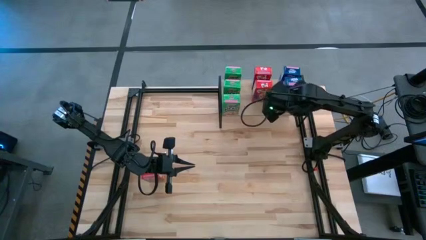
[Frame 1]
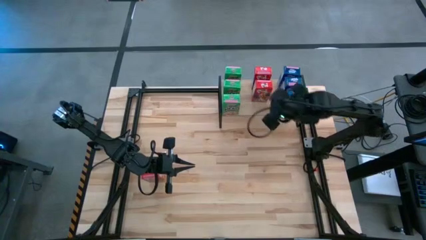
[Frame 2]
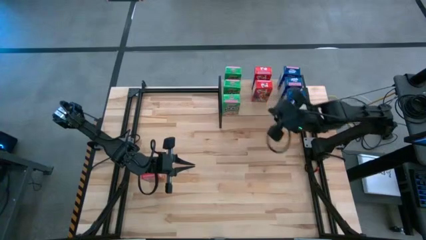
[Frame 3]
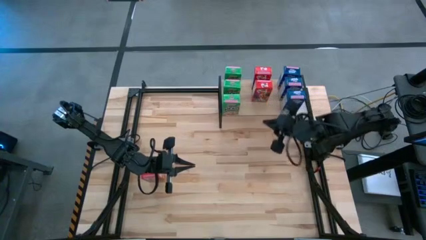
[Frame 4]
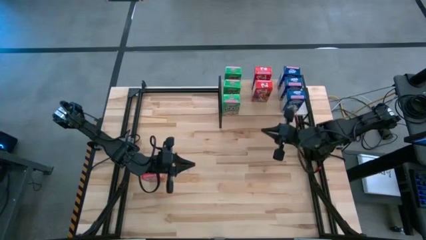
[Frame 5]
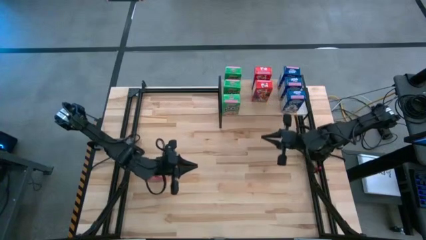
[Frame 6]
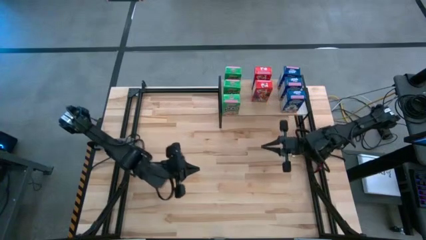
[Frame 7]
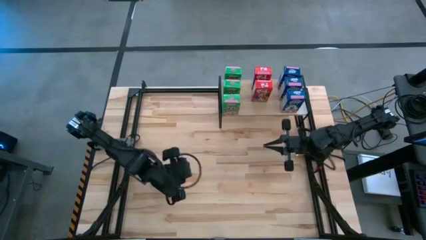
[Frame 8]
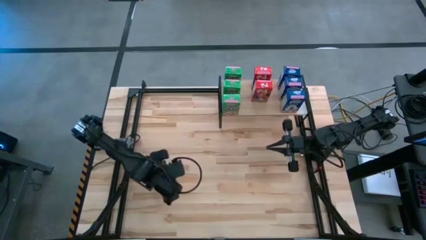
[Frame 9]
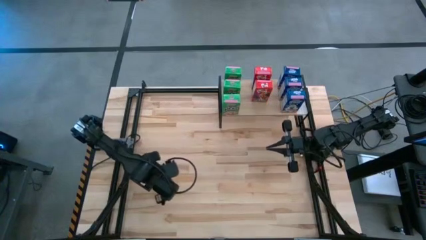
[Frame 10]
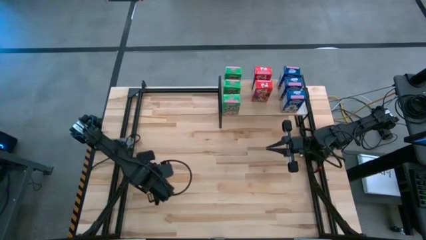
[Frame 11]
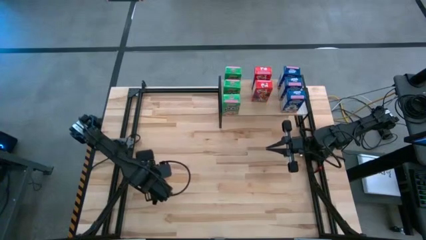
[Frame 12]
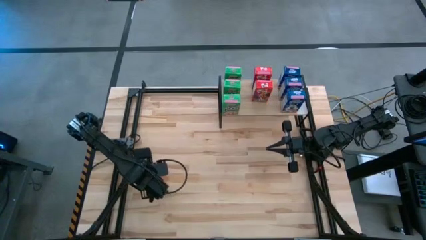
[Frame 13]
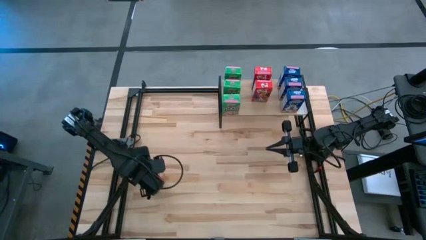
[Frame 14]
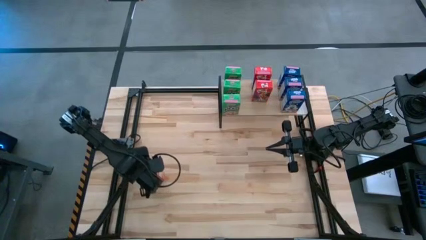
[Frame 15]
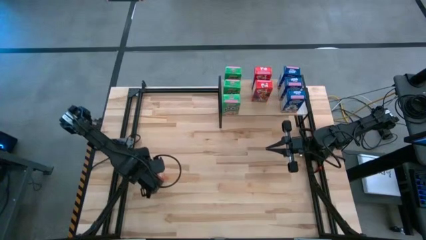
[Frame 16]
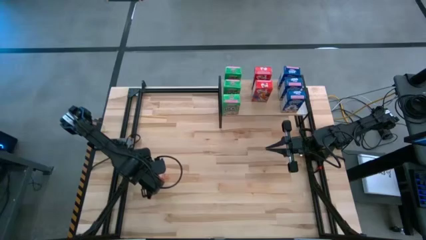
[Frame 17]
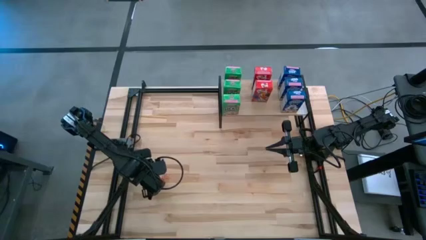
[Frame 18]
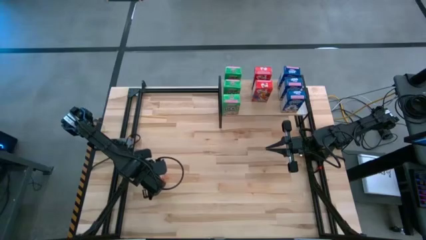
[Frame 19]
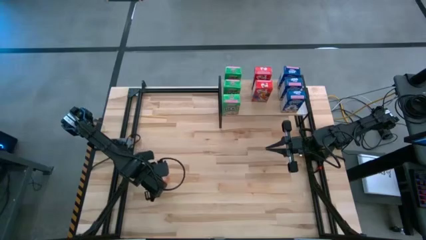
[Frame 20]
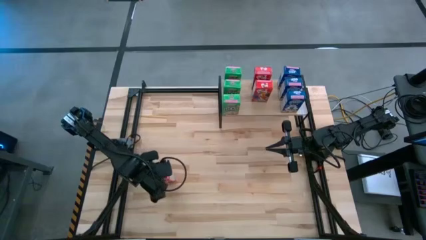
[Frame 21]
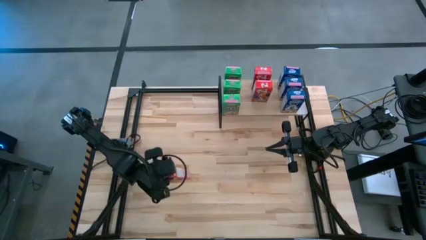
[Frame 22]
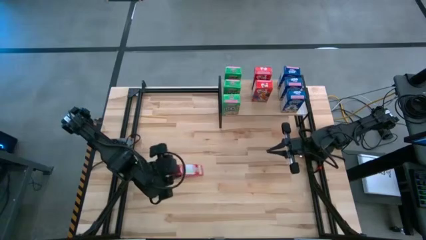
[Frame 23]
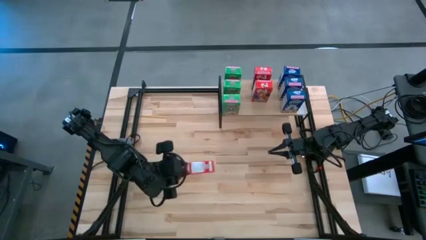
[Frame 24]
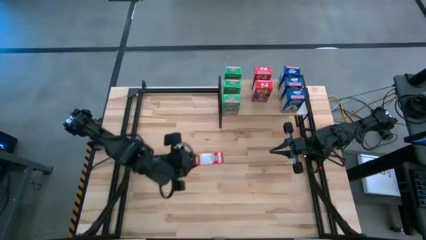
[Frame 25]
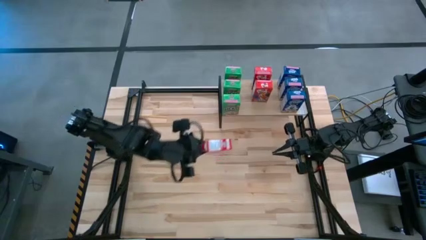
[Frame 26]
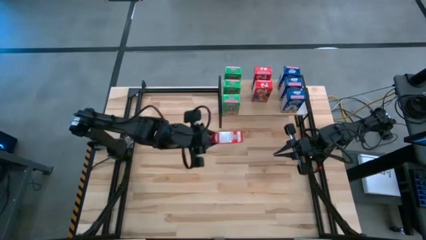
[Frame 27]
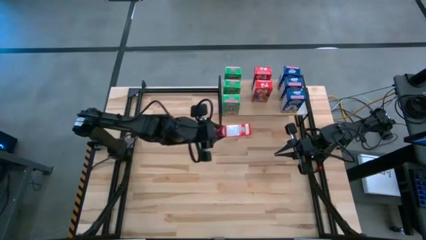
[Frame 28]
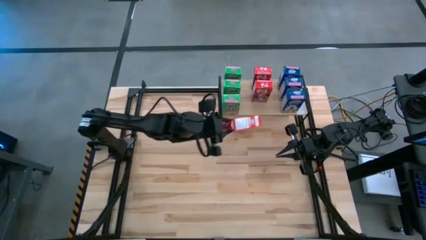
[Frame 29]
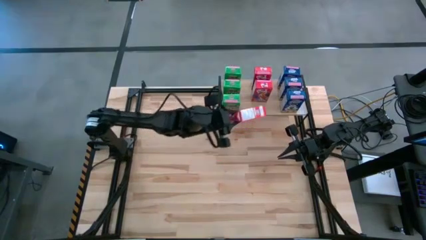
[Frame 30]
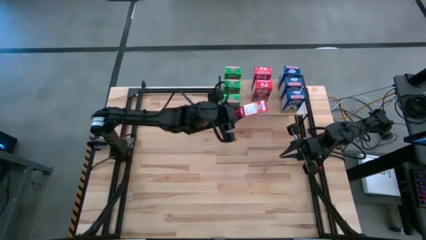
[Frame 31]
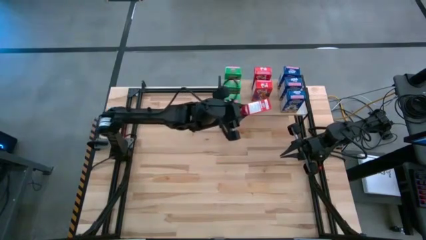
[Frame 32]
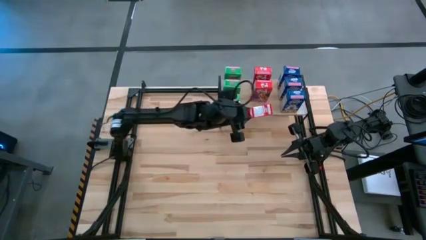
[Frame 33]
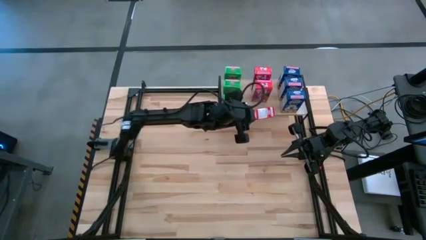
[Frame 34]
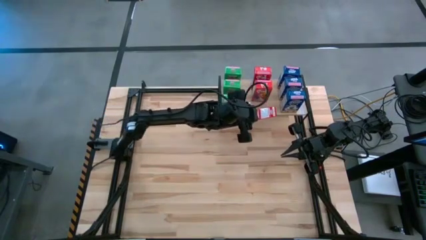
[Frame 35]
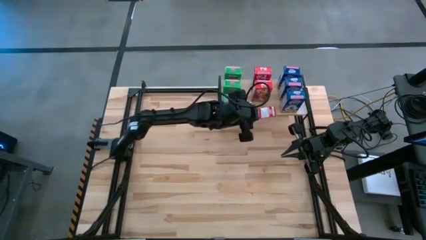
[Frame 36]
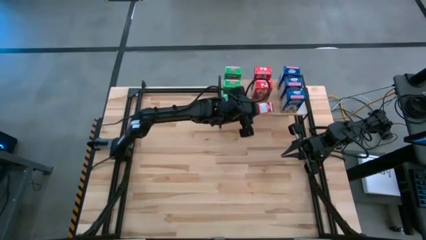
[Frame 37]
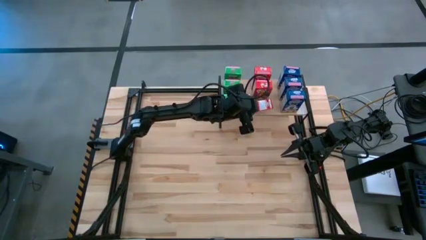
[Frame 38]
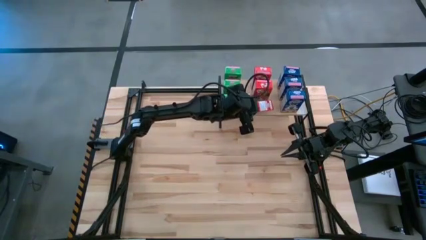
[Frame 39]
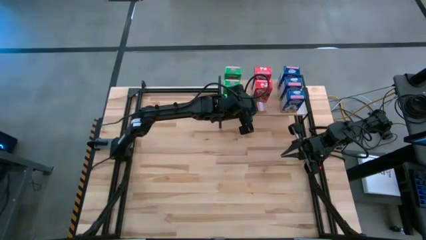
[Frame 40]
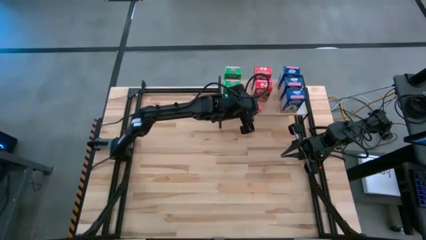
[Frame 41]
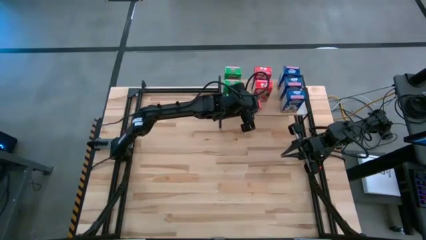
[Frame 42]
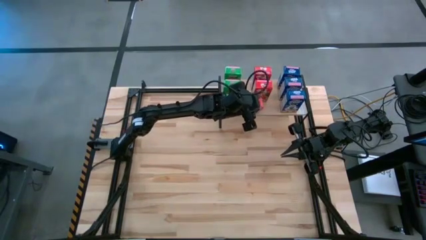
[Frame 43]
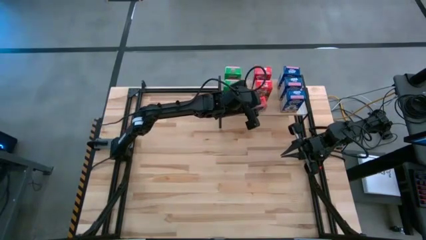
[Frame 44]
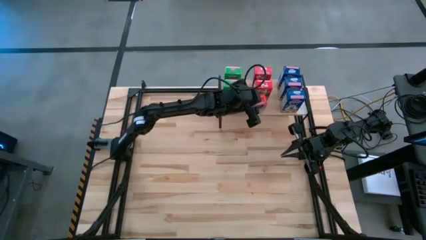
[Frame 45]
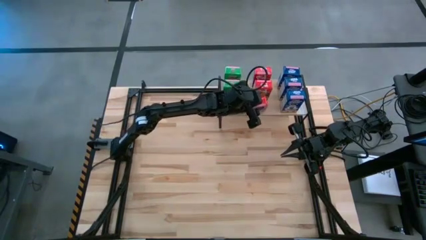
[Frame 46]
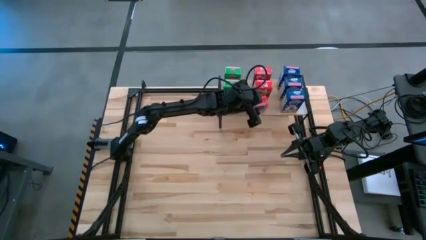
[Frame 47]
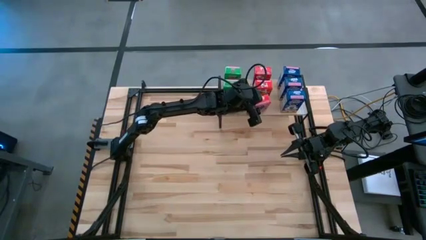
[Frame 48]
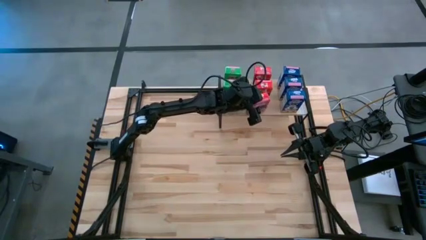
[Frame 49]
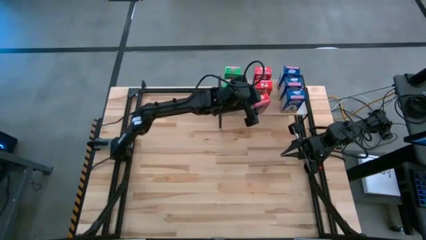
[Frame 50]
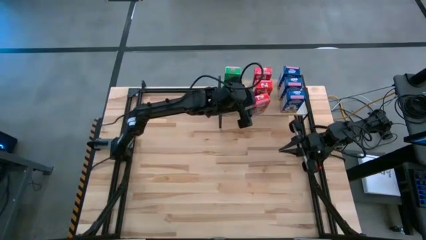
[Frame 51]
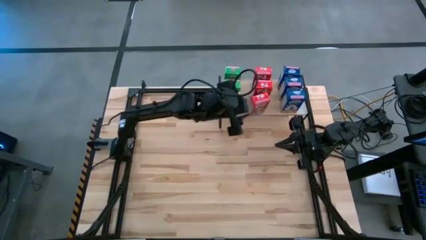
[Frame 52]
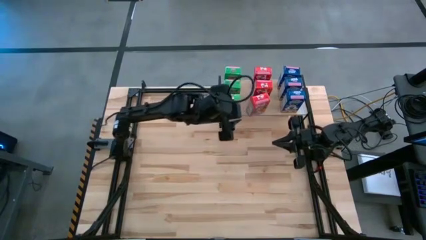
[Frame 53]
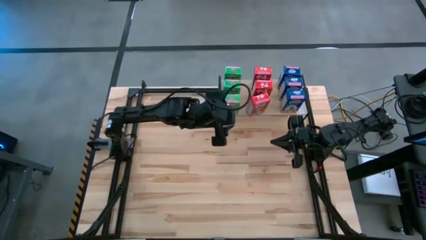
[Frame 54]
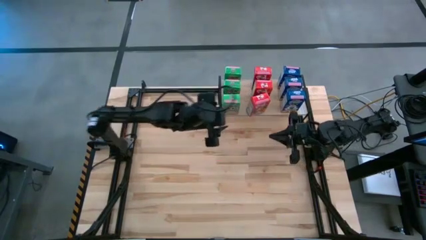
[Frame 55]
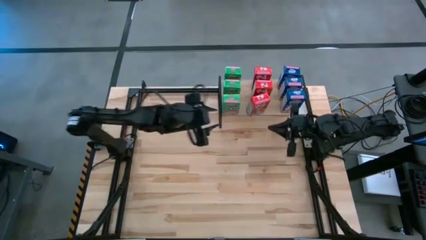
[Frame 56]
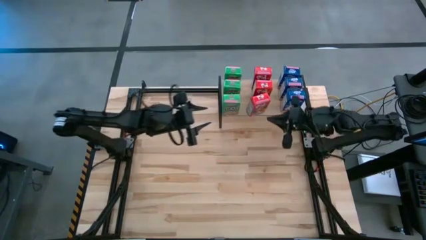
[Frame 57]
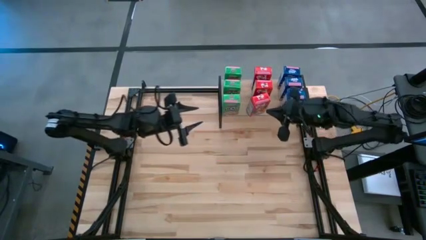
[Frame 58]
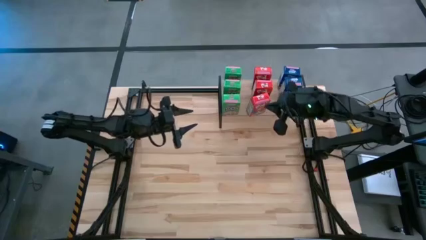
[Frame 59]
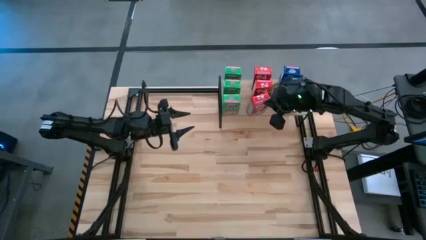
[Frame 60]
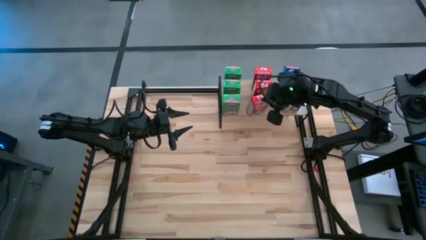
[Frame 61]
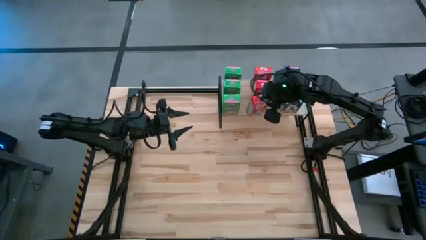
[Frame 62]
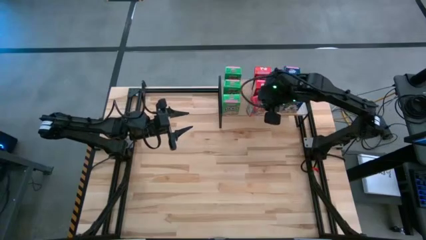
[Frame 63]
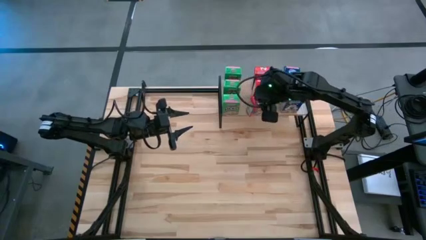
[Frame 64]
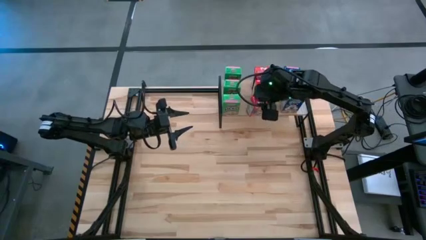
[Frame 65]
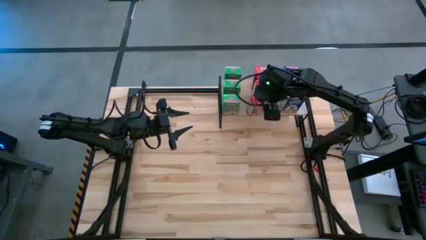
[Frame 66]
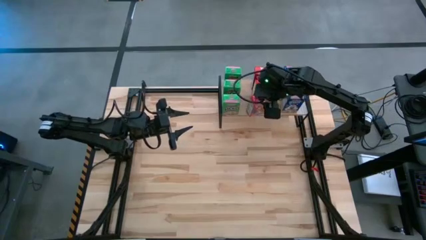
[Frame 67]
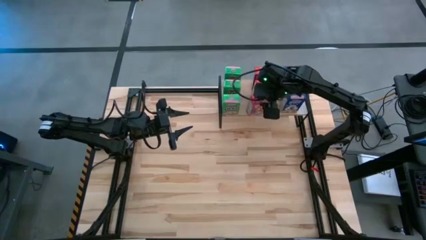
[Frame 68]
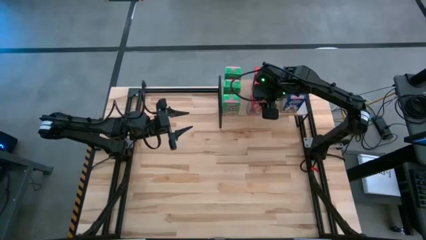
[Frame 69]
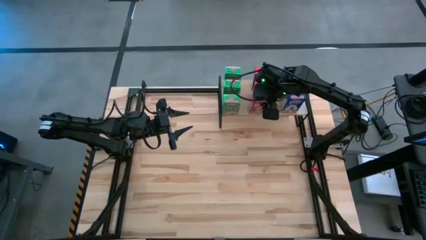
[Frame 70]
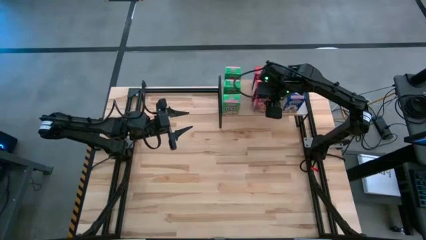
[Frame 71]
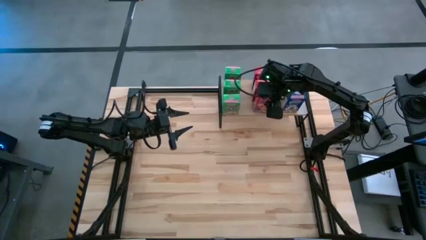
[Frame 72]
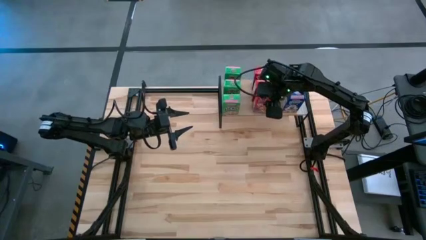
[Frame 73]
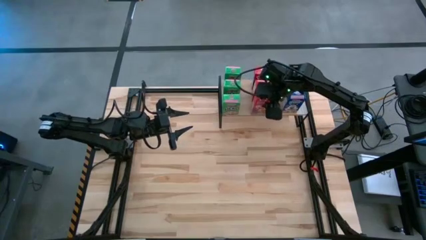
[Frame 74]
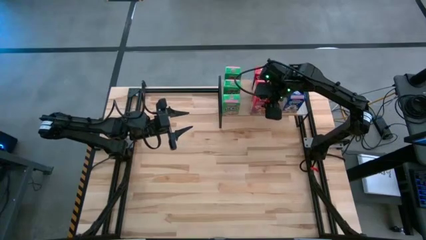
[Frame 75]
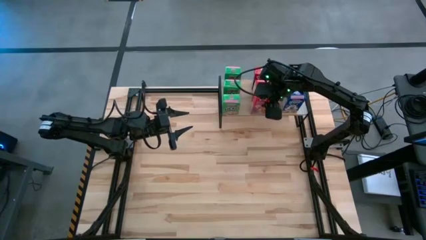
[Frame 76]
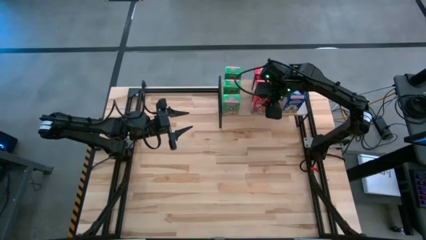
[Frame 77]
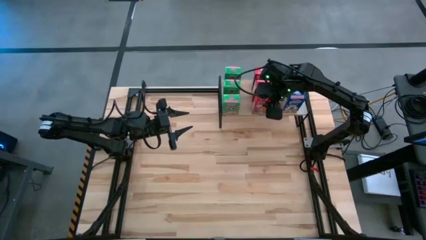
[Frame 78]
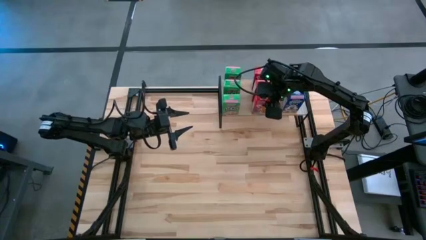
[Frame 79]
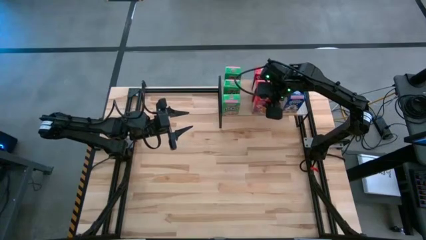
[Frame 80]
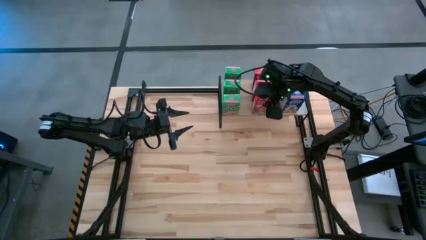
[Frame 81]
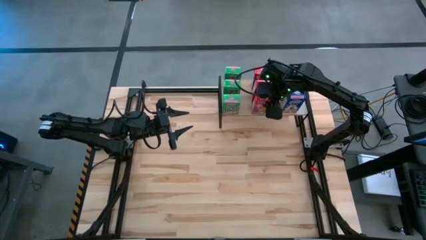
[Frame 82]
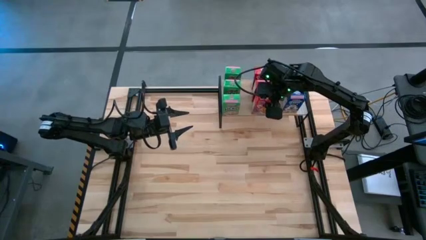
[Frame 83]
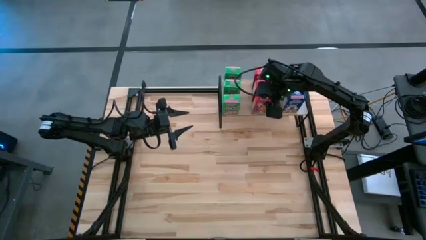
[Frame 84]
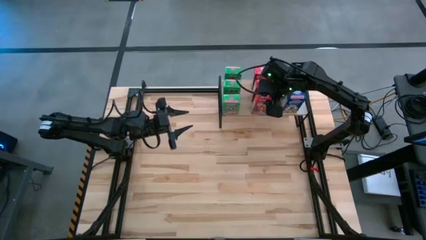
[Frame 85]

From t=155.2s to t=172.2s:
Task: Stack cereal on shelf
Put the red cereal box on the shelf aligned with other red cereal boxes
